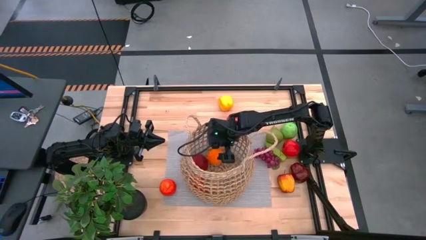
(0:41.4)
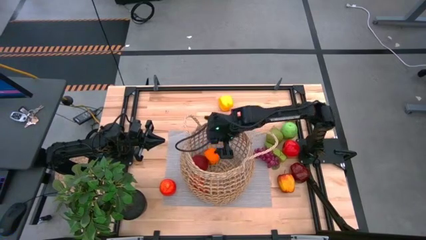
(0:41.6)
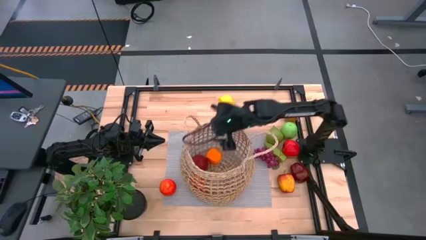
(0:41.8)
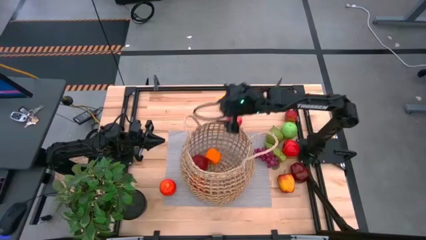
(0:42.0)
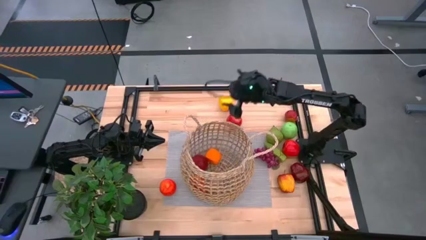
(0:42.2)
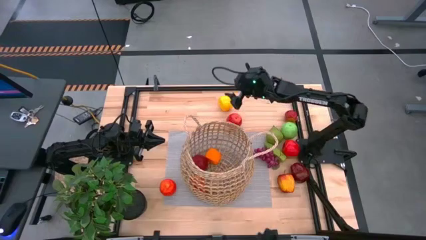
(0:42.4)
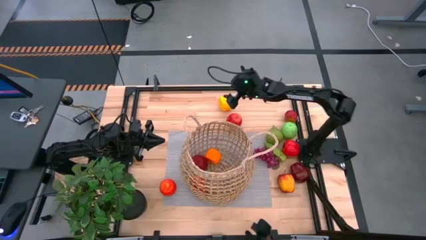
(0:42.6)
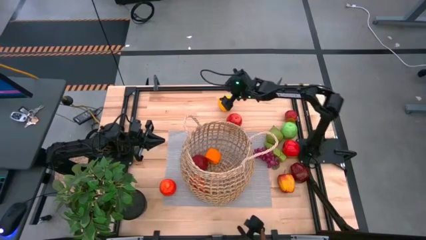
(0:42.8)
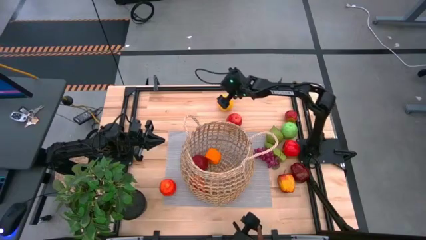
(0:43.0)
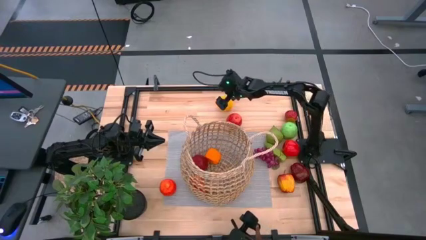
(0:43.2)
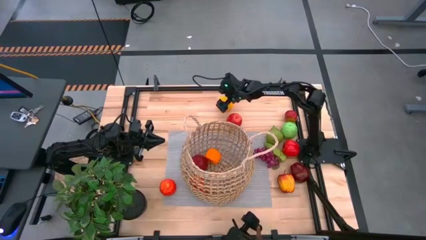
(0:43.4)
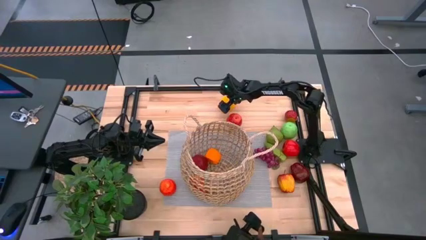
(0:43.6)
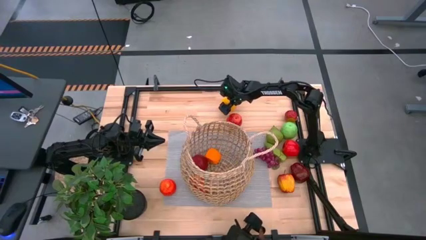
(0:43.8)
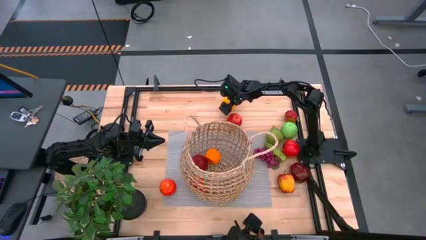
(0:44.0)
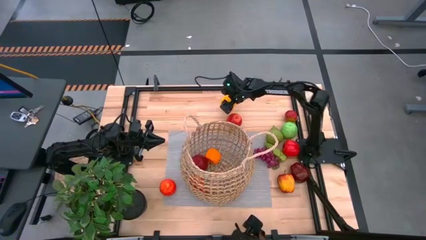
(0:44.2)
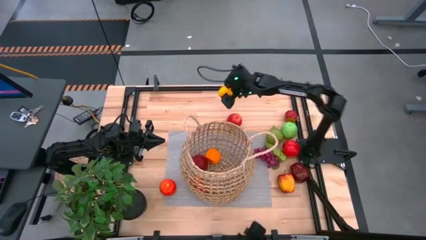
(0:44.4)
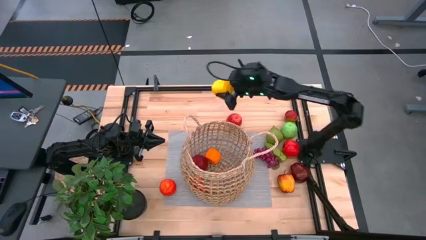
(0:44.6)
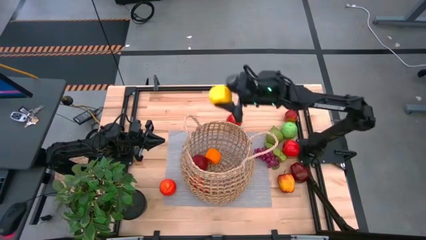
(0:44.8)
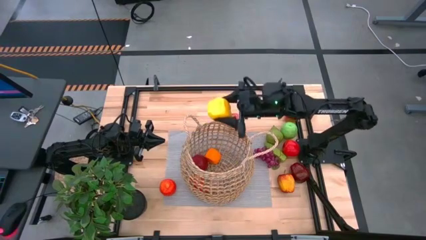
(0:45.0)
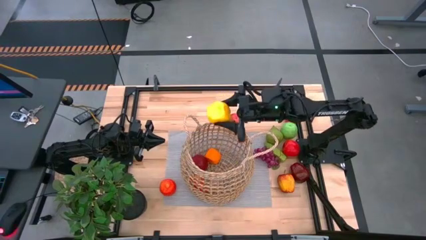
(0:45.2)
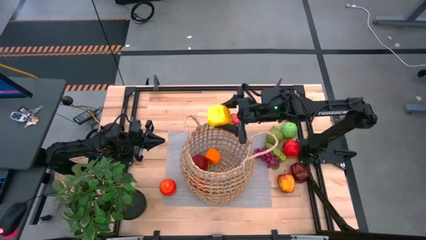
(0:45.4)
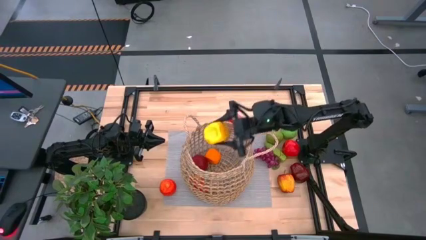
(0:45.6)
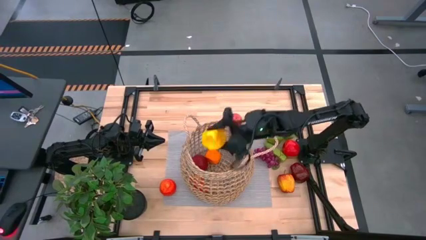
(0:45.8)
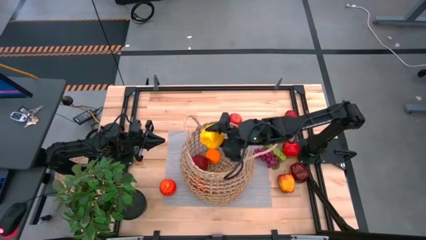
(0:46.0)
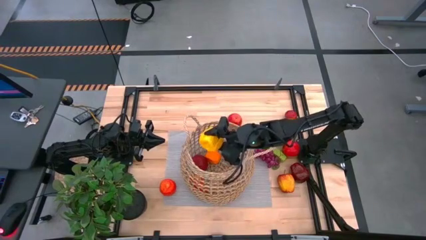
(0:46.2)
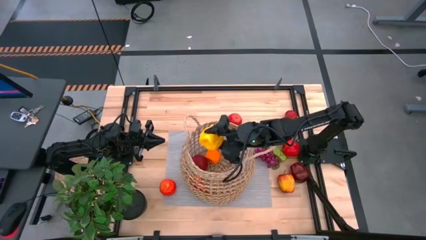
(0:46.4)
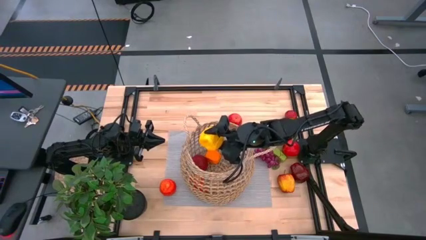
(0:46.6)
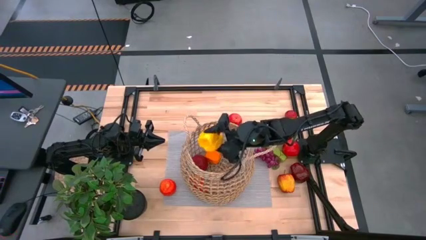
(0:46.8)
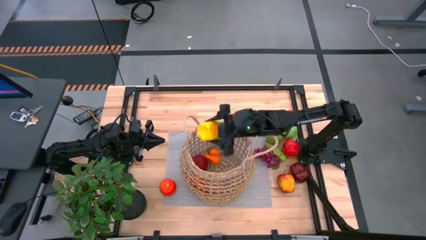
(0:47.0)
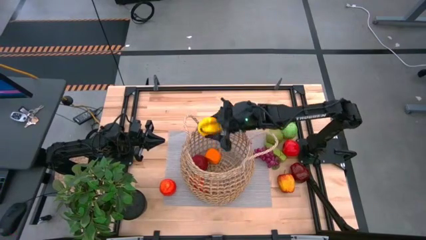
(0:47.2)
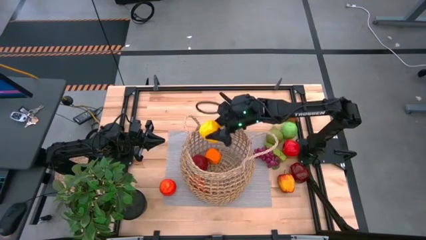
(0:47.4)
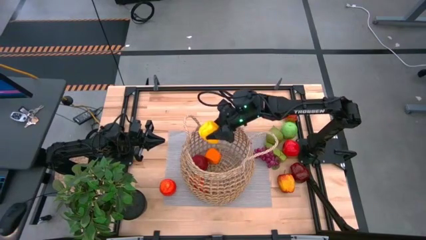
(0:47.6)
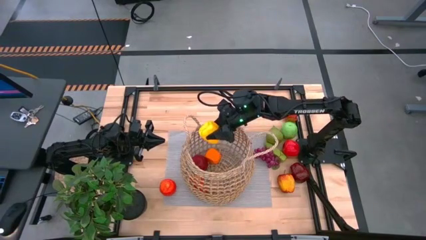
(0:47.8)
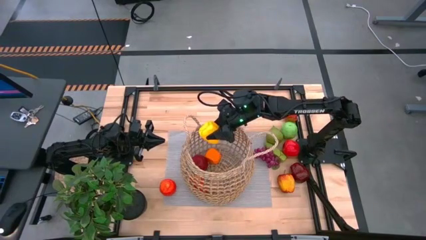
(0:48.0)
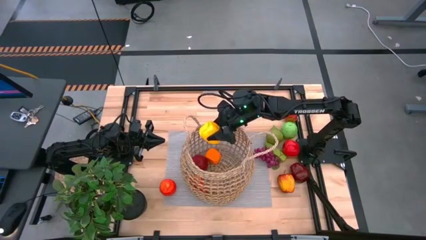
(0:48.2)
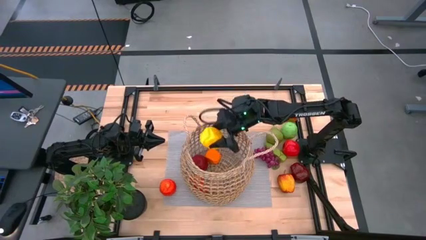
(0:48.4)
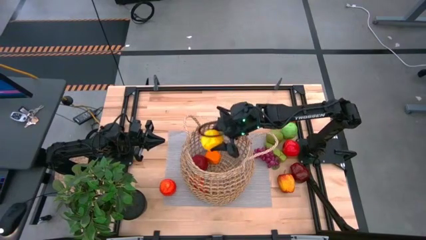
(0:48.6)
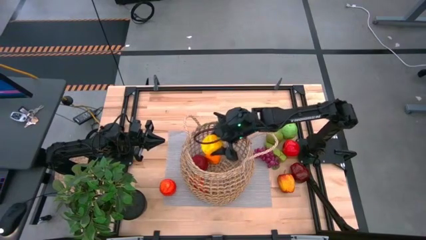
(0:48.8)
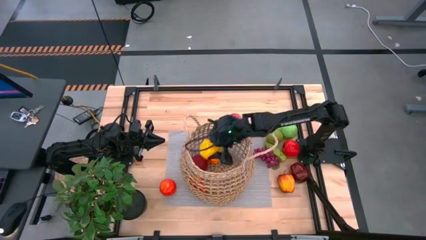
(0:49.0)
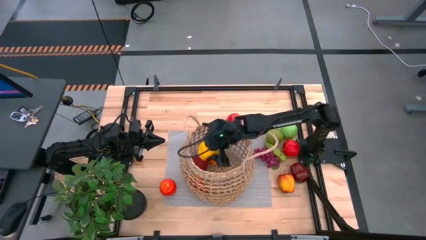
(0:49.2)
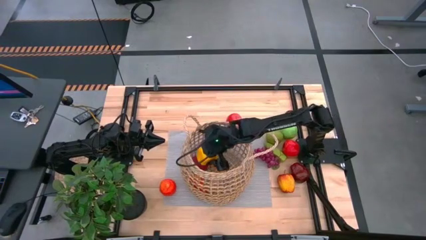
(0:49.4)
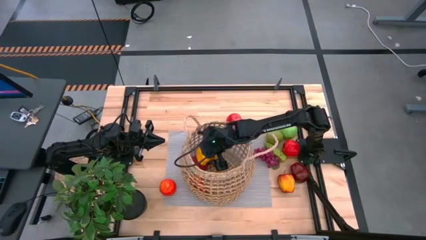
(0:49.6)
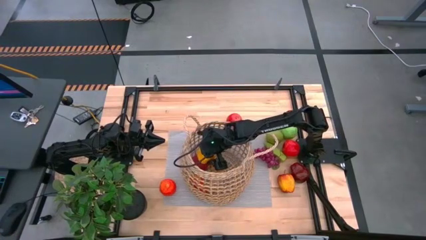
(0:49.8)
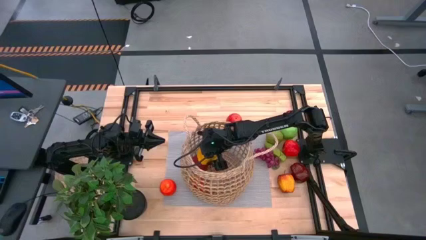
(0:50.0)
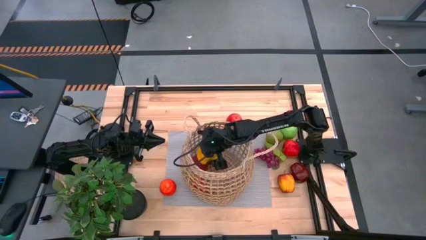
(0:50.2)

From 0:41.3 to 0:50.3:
Task: Build produce basket
Put the yellow bell pepper into the brown basket

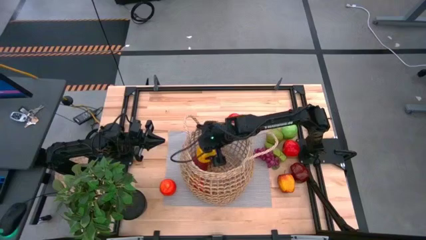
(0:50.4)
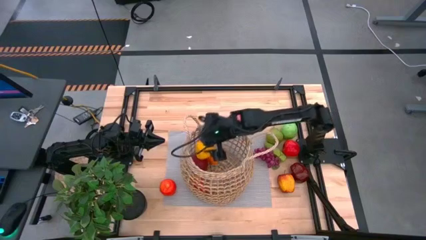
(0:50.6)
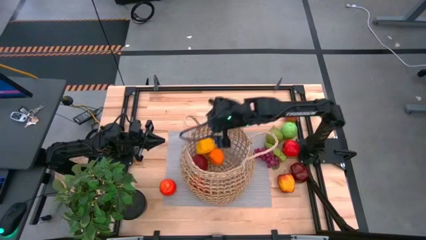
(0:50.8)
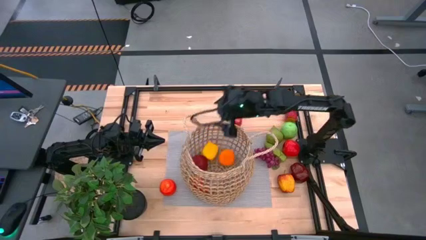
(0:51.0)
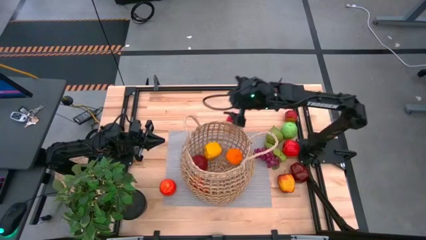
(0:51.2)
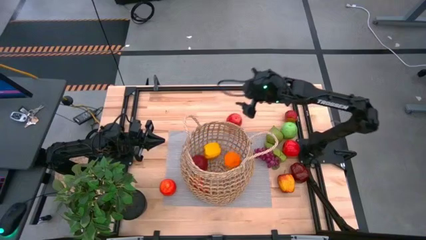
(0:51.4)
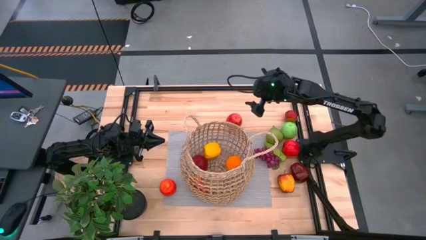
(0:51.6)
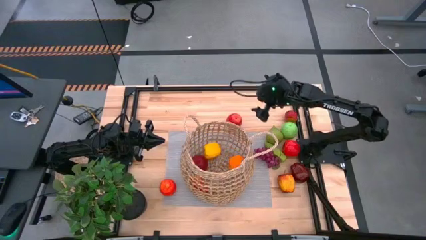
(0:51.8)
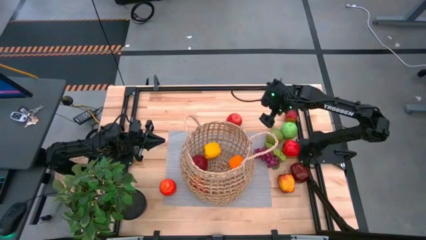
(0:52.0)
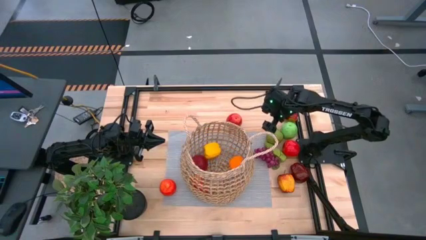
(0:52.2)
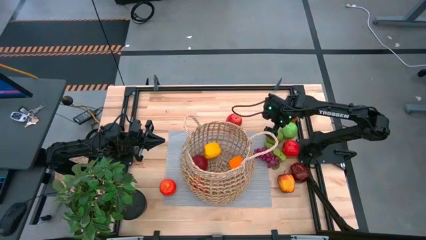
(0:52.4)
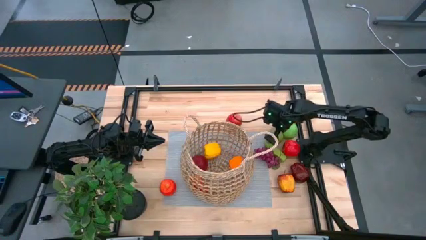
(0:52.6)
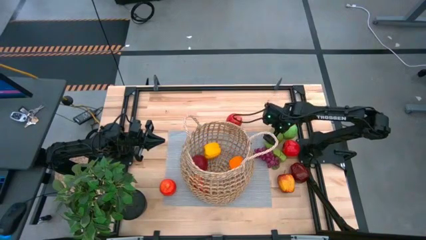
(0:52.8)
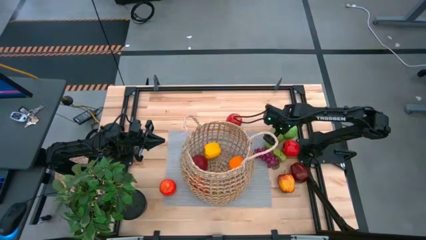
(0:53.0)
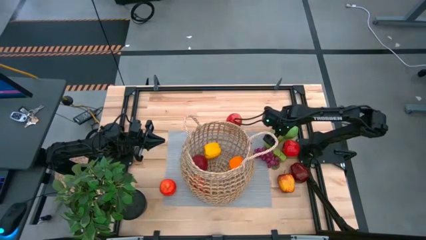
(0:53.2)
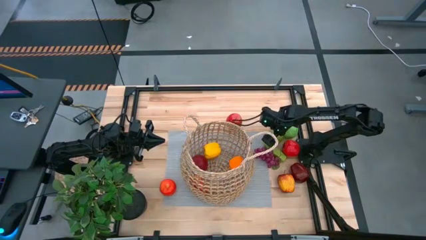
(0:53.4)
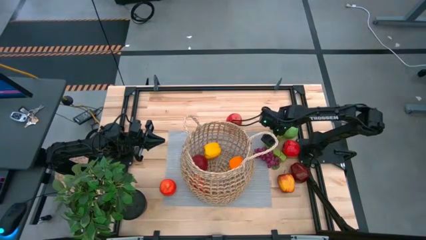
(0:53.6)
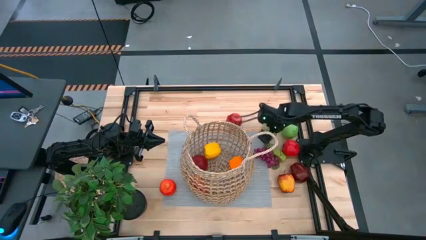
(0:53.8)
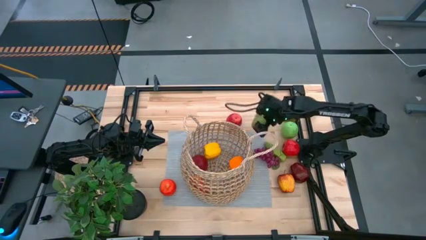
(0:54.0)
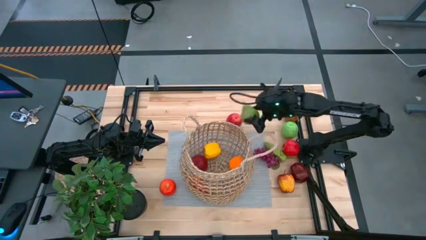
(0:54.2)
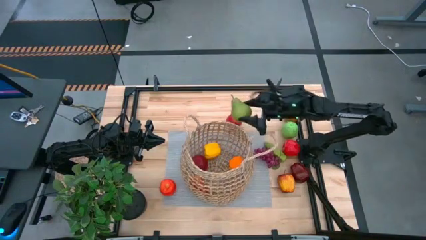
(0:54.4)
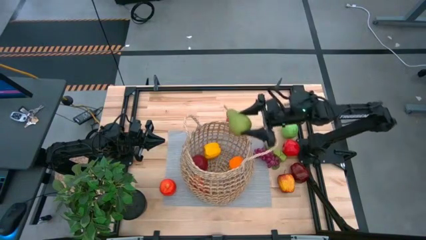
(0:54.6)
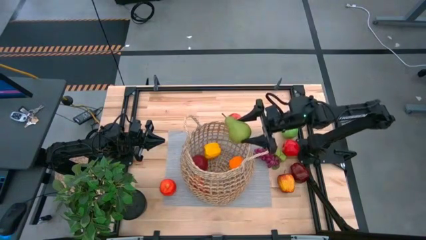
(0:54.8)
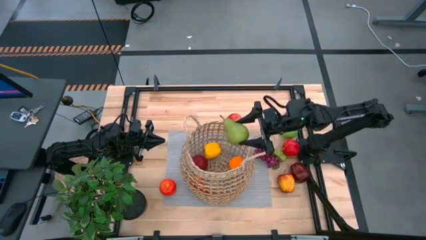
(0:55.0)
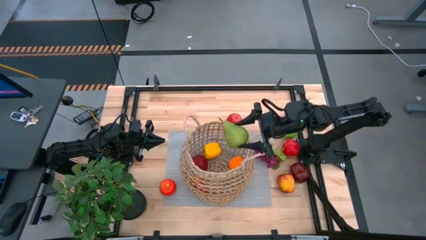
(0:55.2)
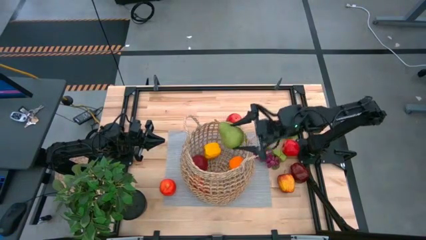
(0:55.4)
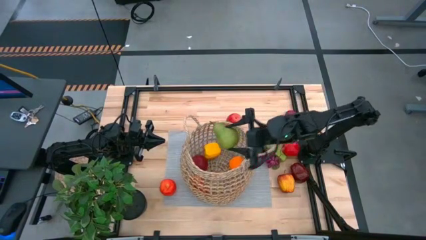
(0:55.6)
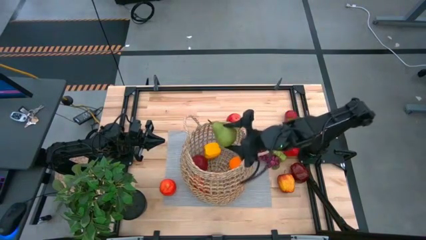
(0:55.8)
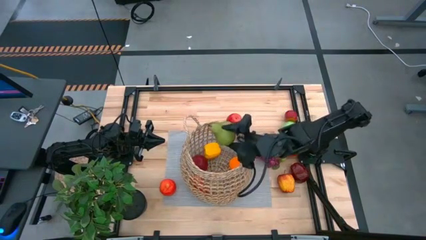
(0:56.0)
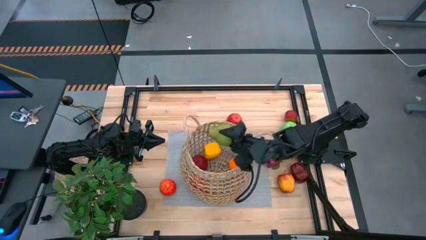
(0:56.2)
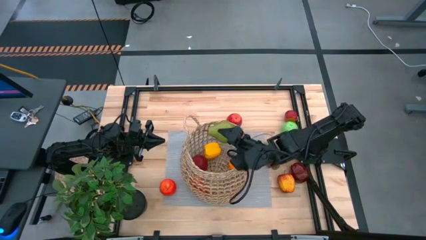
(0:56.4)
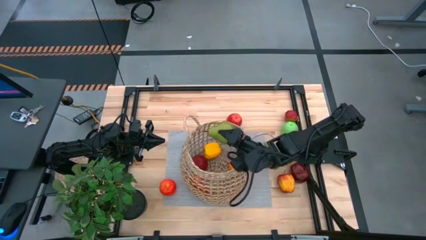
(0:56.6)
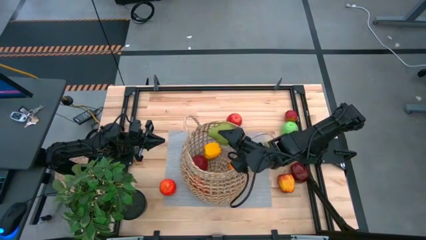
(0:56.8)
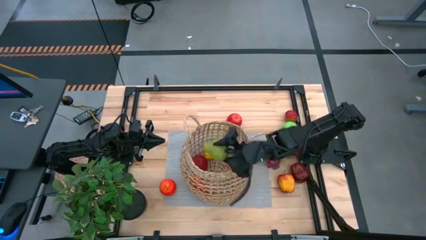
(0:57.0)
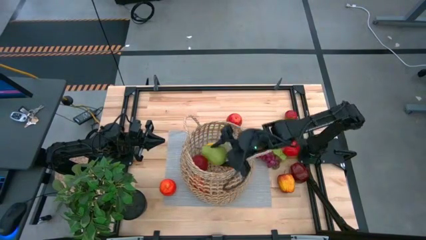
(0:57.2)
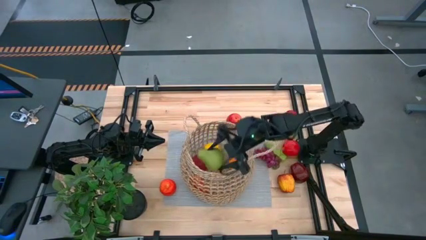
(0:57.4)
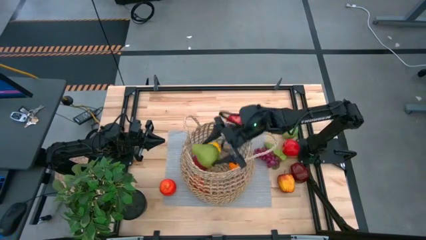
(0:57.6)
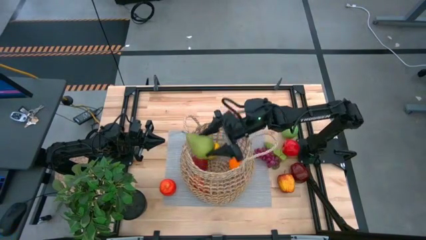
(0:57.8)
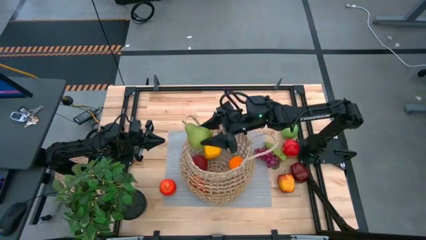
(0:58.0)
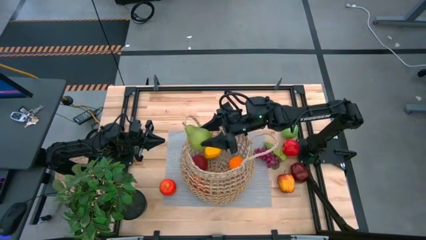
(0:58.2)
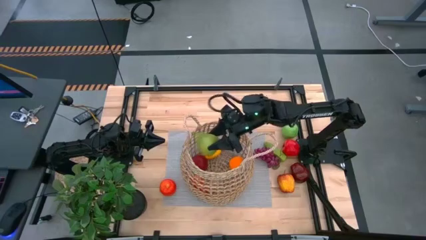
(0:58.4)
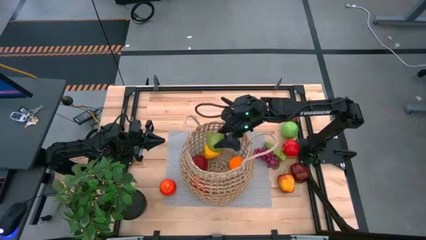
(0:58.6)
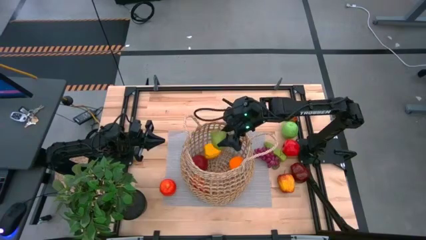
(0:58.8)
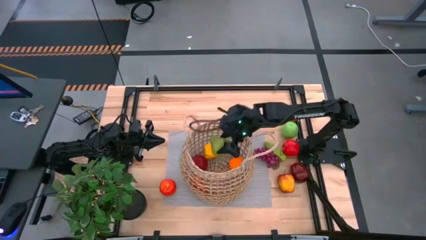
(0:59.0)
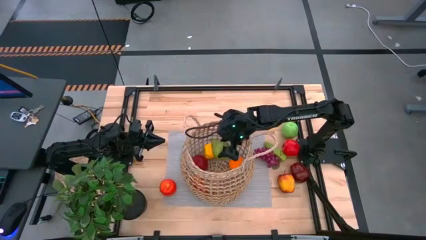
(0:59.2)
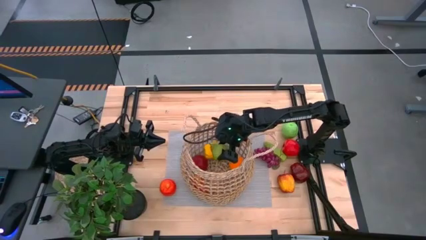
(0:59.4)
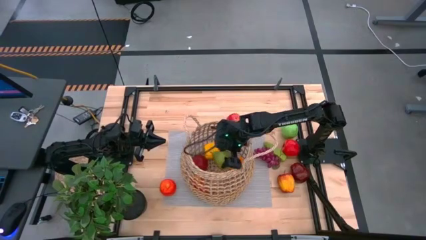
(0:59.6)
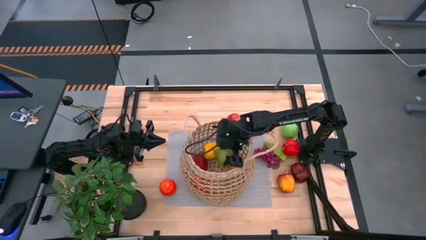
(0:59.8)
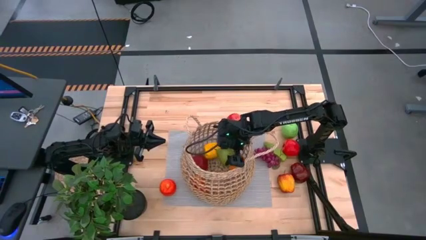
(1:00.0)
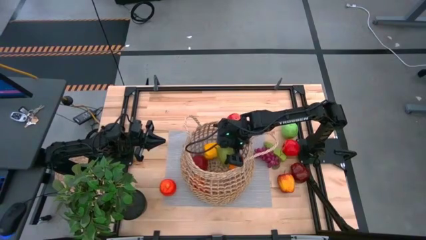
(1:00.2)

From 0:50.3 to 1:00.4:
Put the green pear into the brown basket
